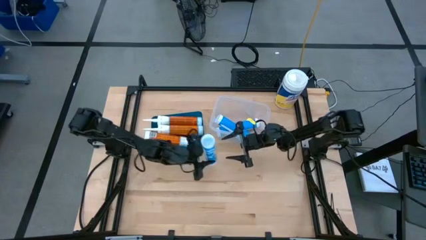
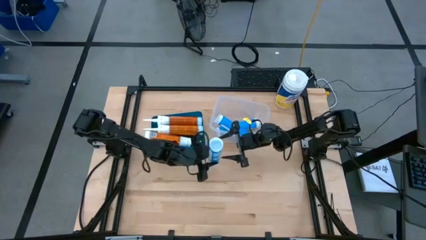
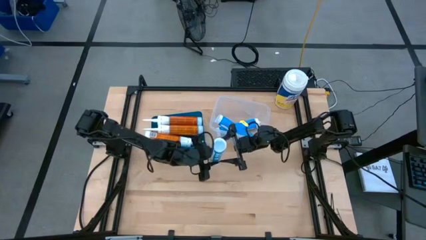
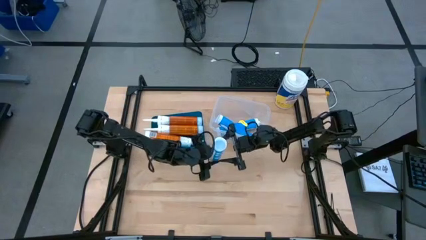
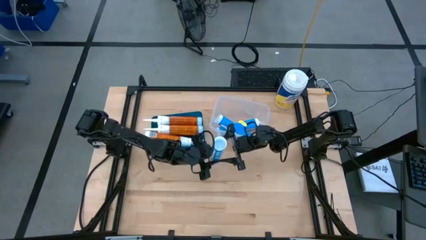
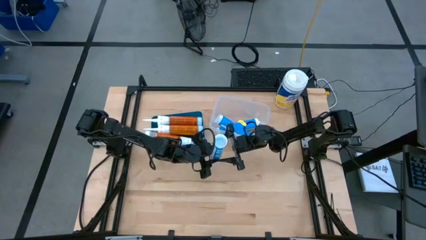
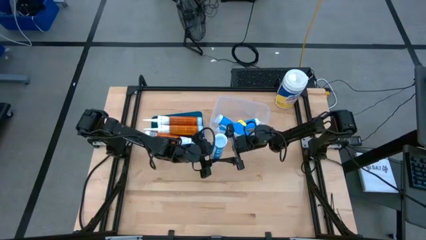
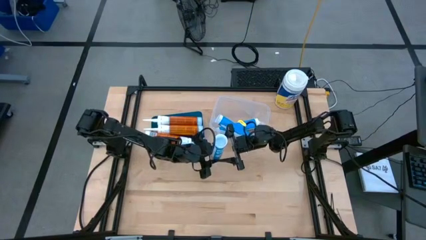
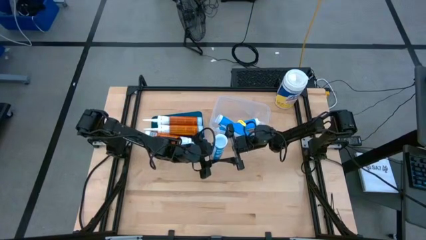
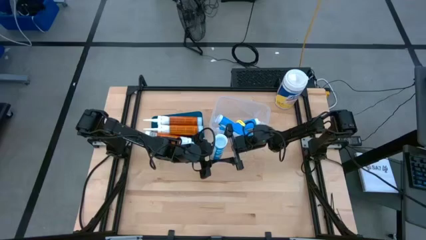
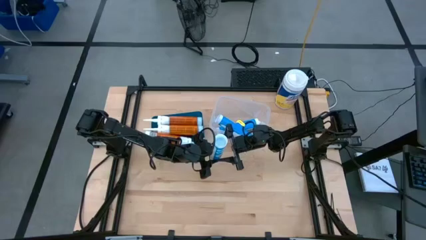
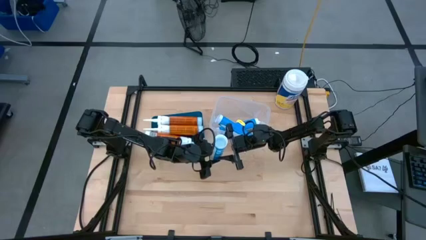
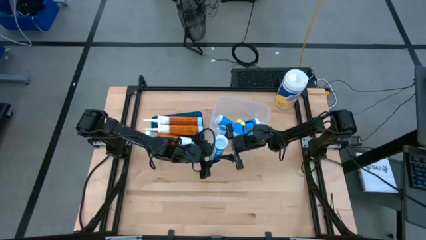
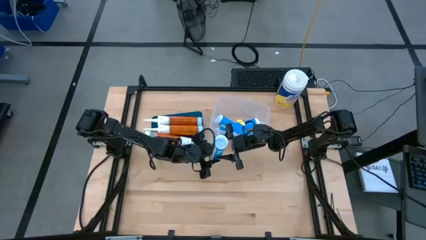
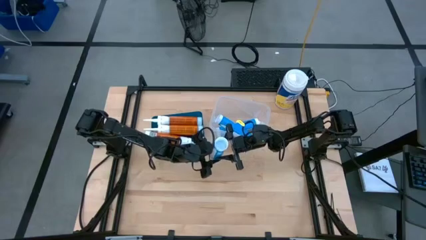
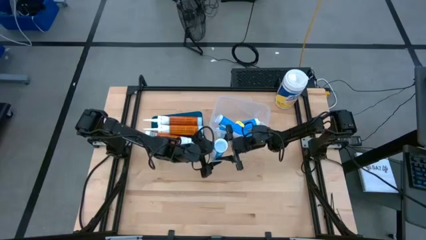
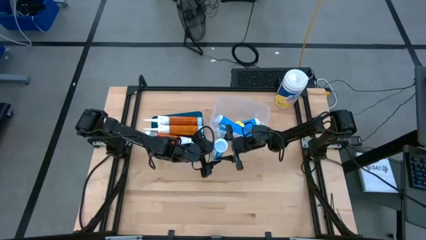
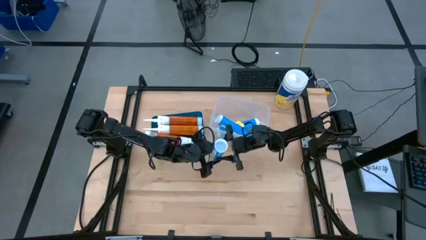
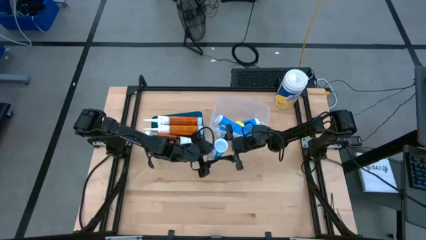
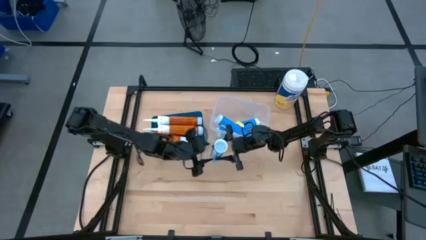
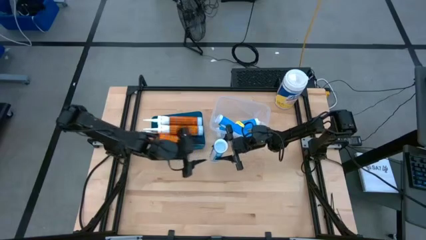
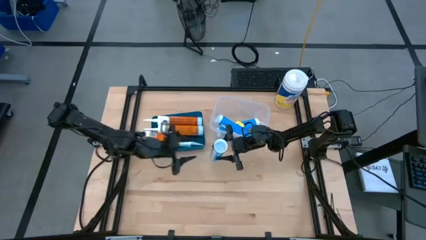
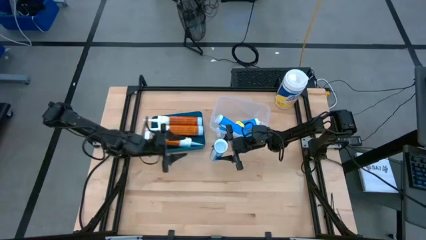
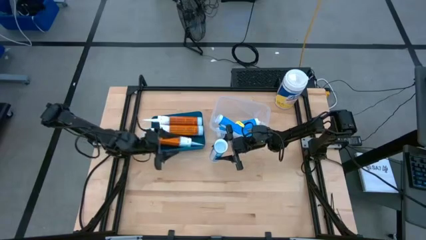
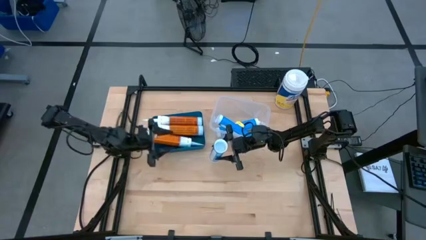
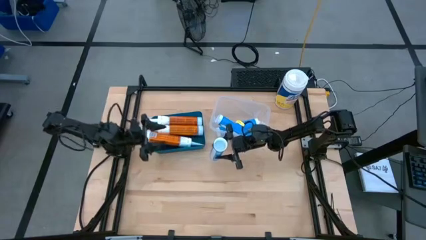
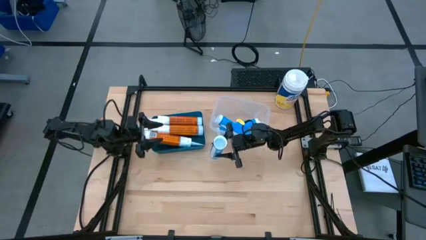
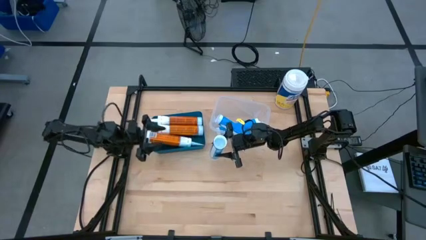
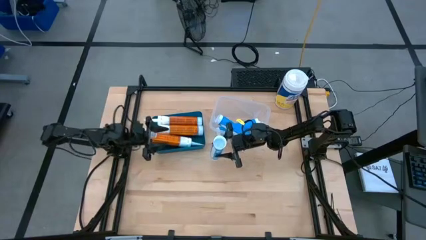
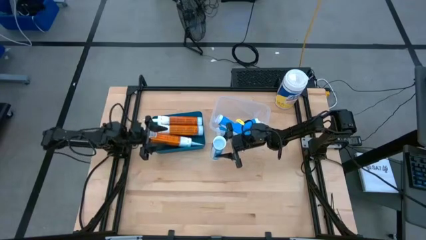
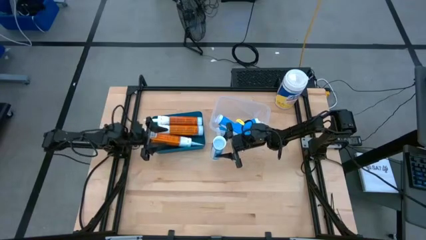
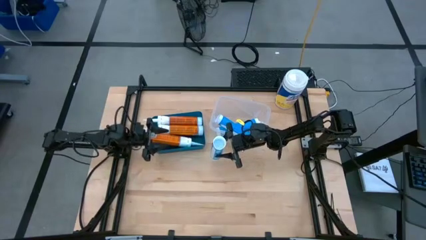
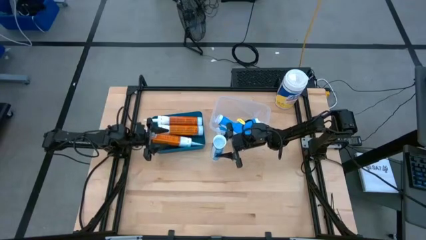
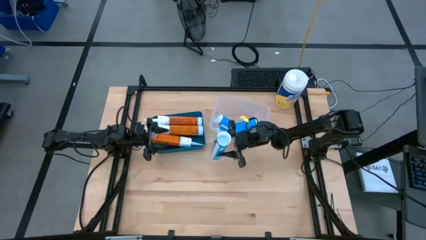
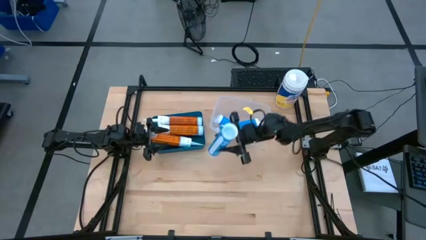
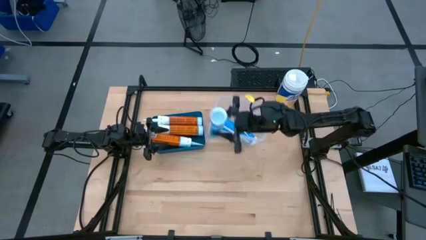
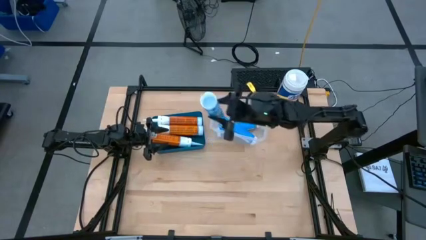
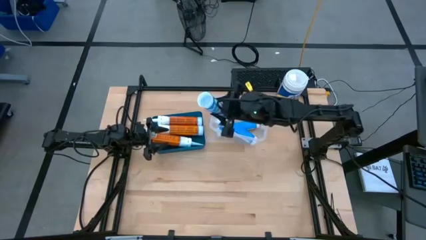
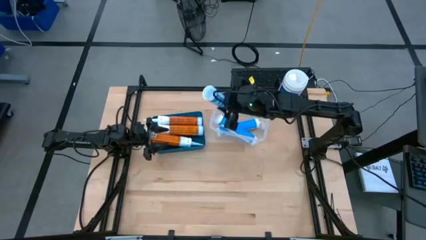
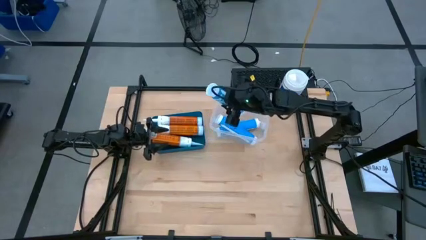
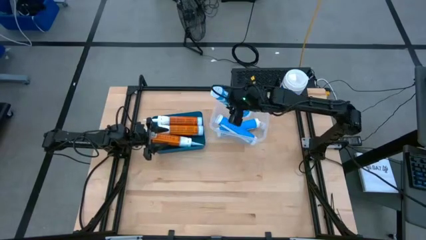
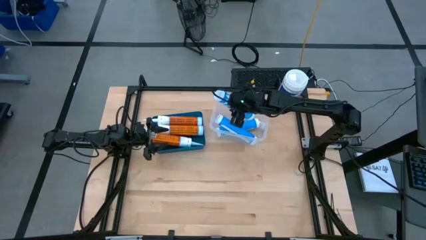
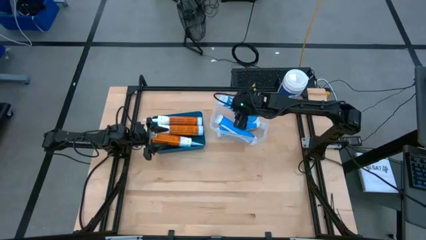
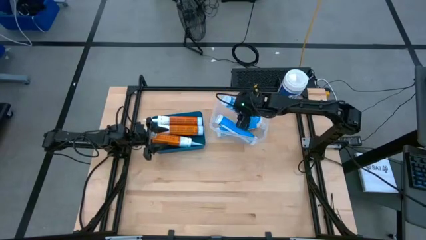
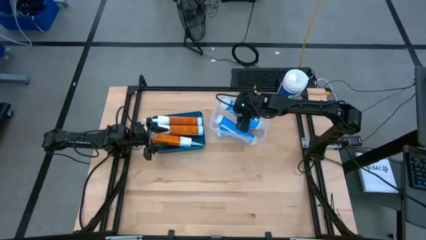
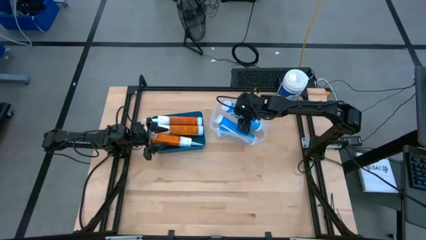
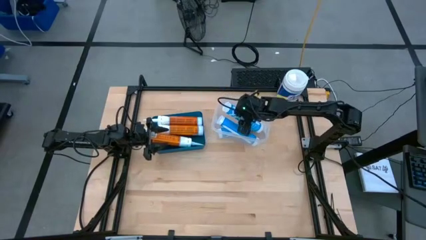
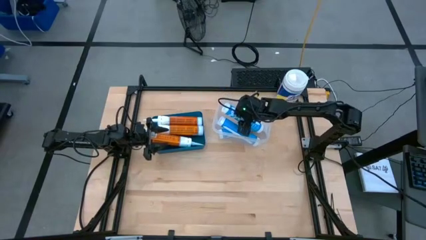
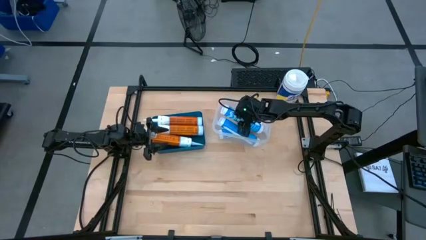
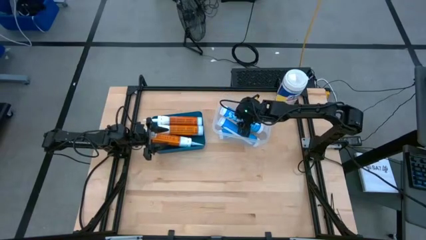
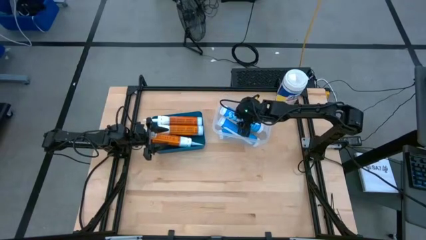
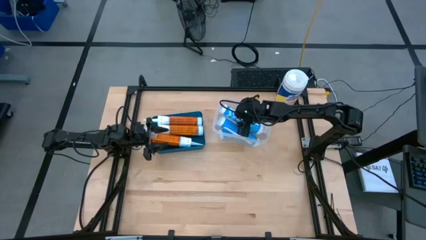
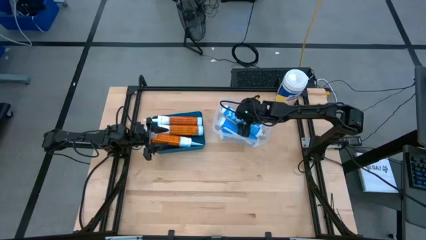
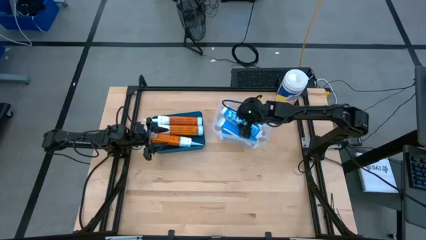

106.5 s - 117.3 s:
Task: Pick & place silicon tubes, Sealant and Lysol wipes
Put the blue sealant into the transparent bin

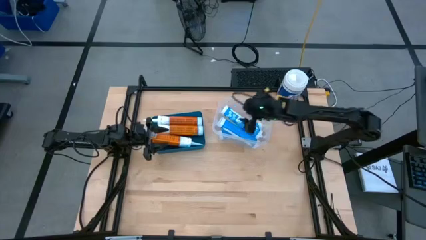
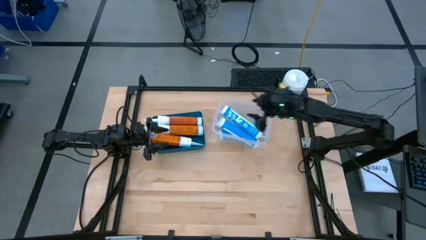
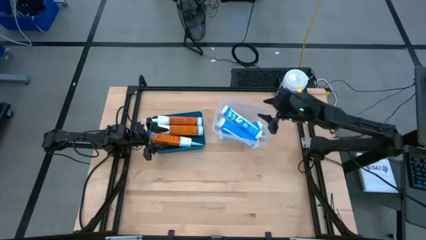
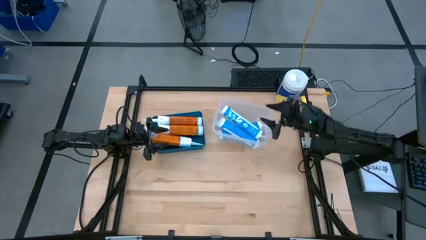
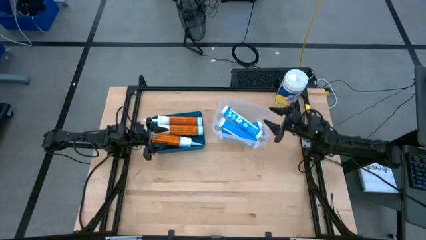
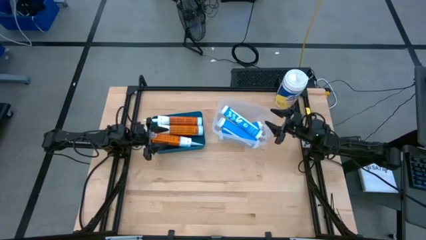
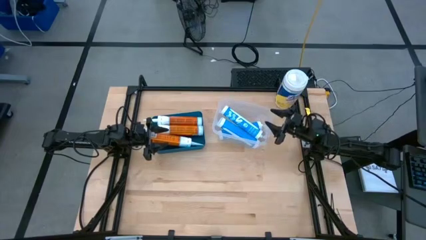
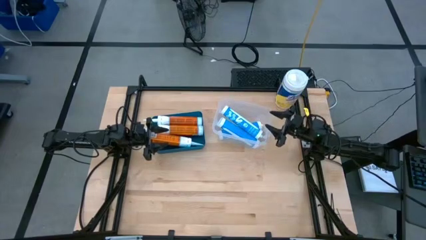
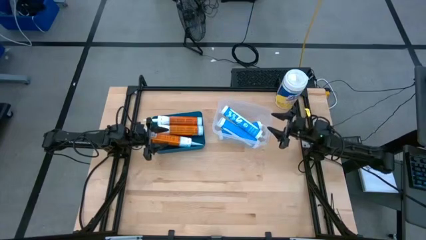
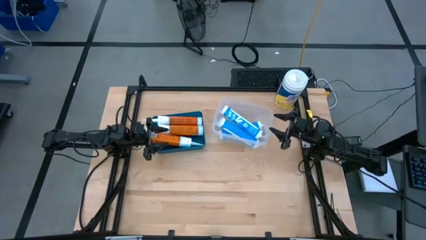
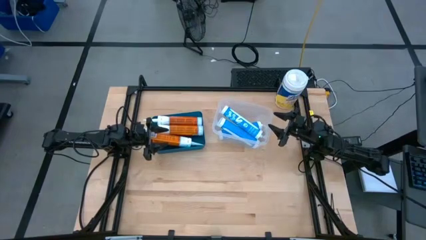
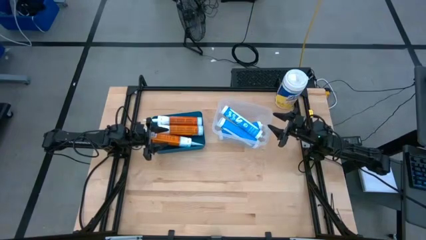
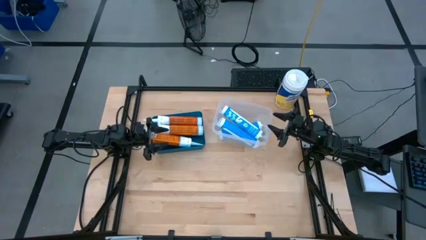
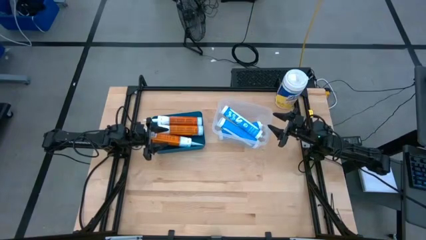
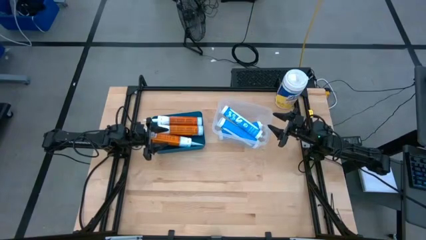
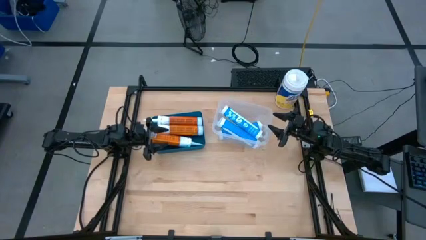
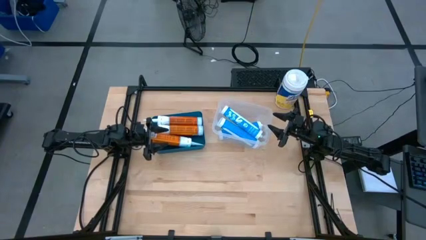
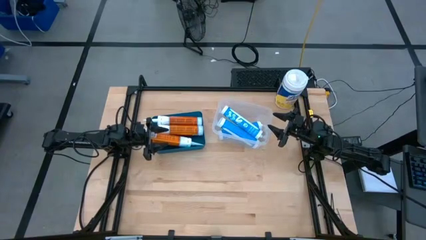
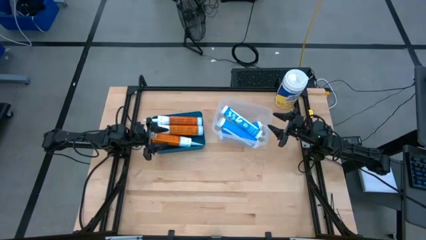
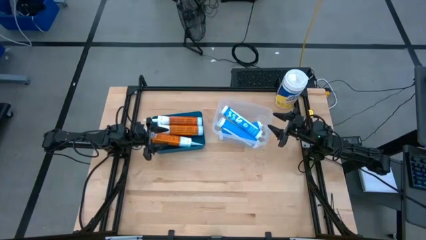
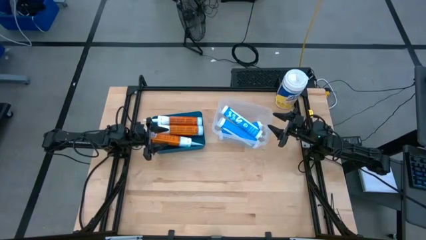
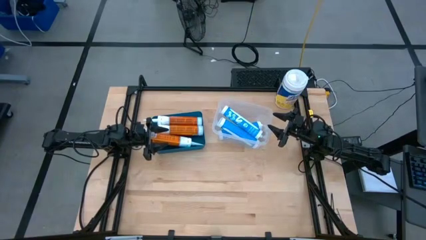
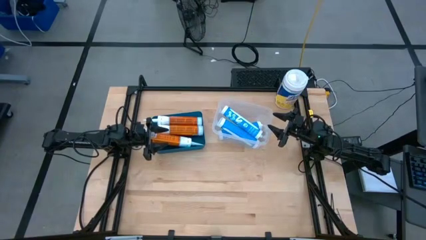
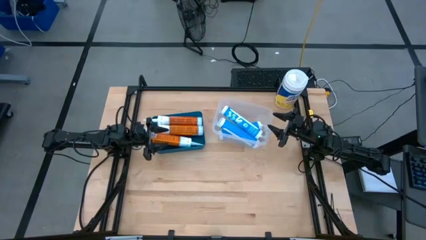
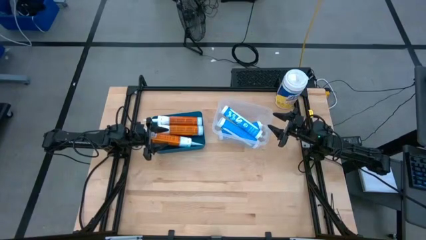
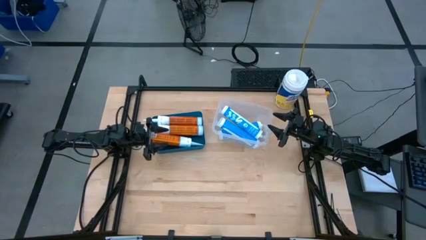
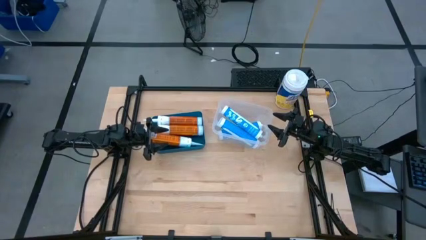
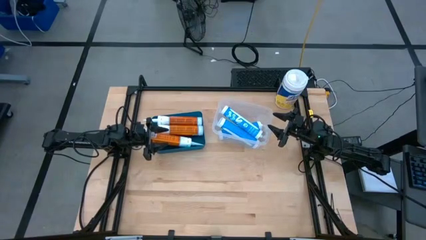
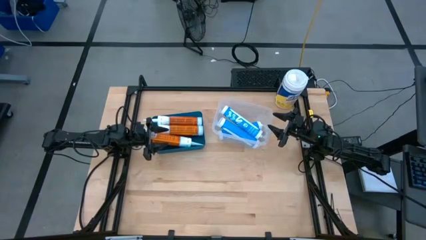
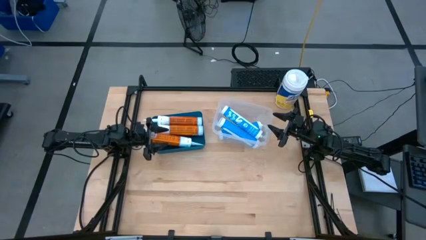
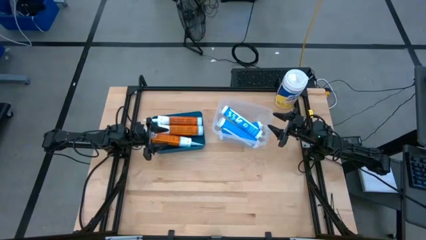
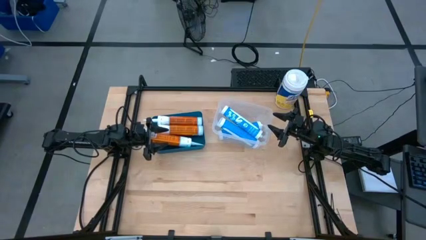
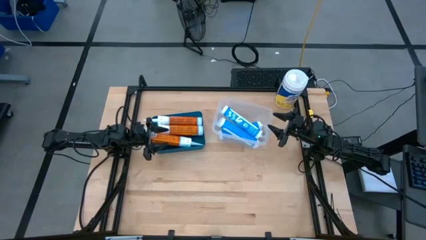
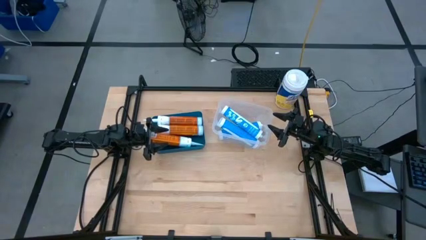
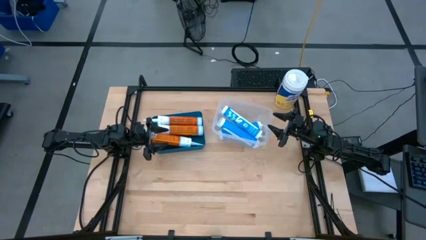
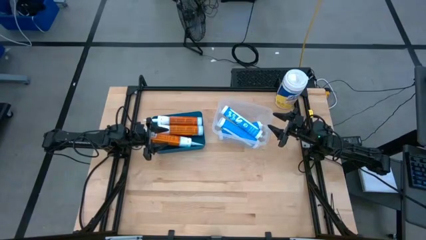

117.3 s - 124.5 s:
Return to Home Position
